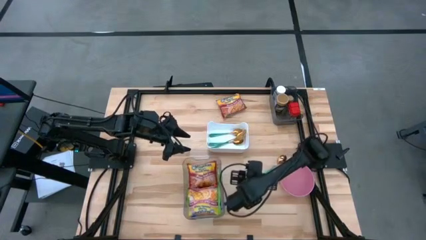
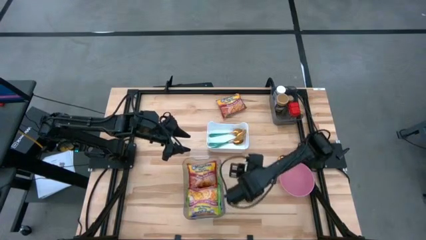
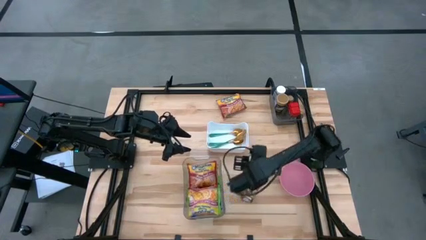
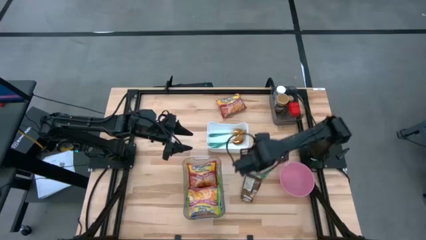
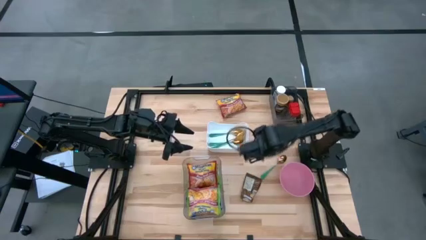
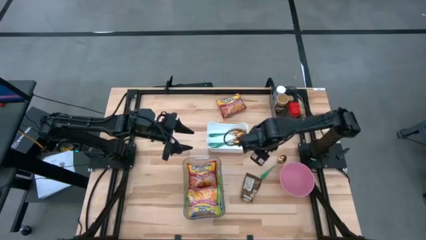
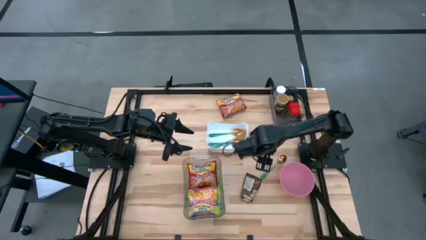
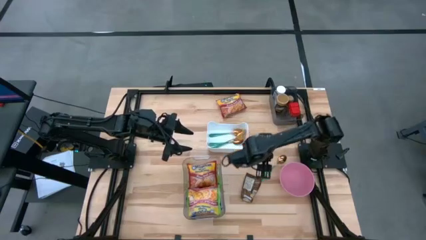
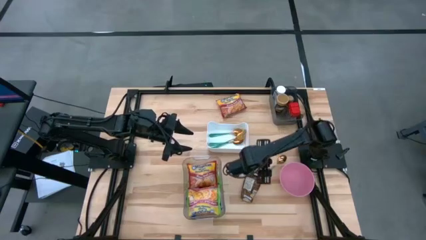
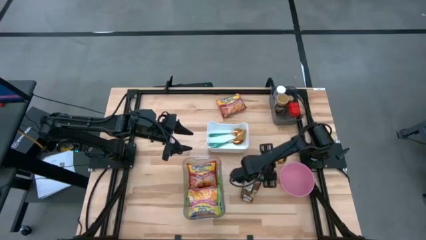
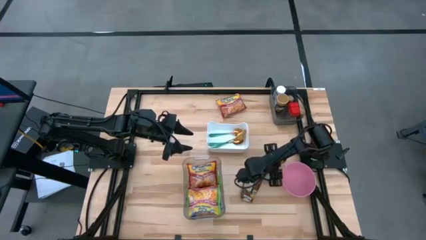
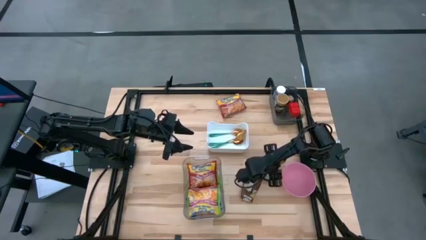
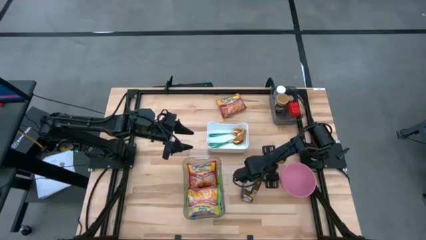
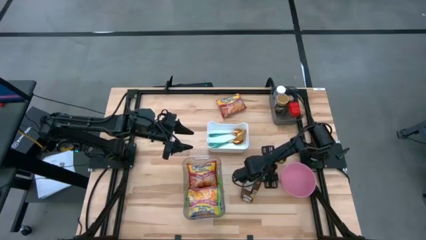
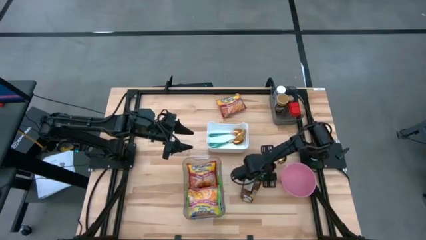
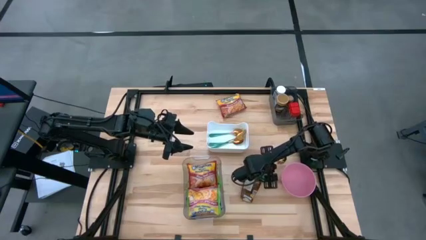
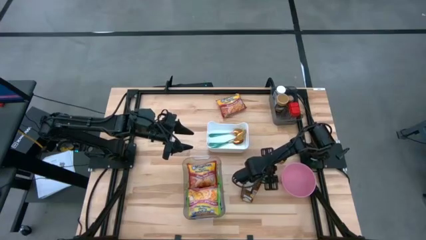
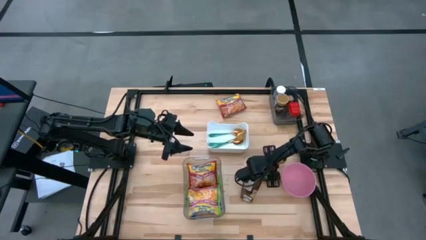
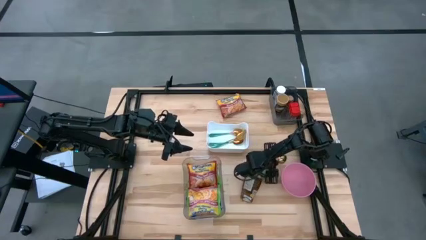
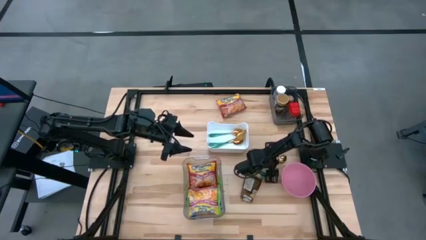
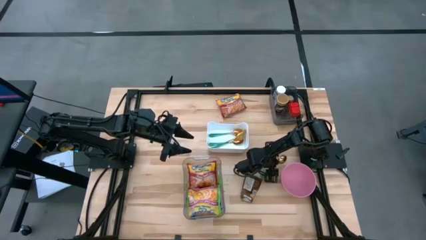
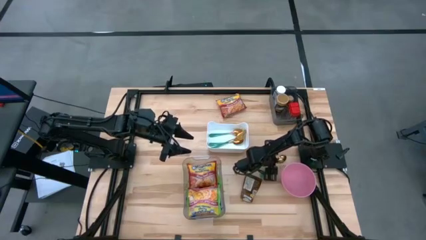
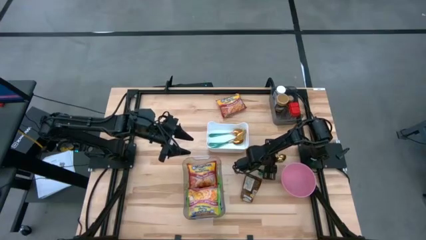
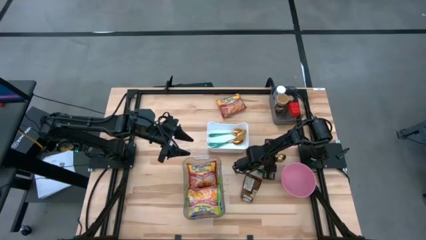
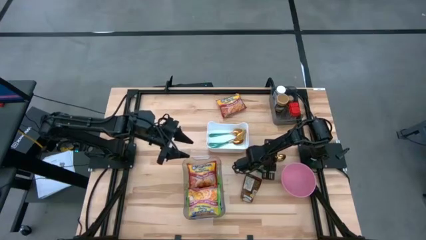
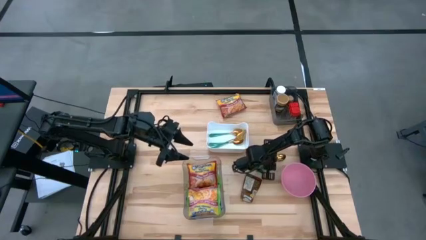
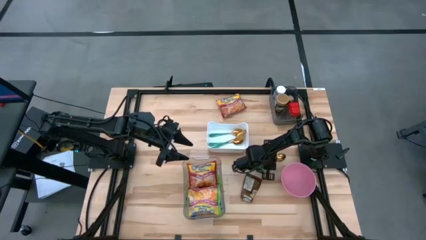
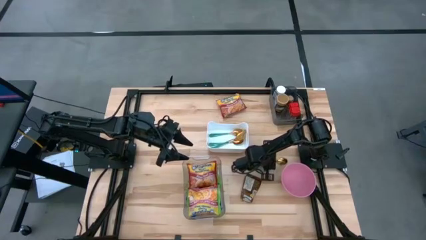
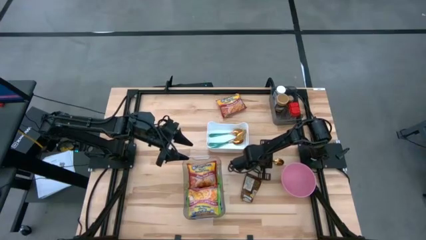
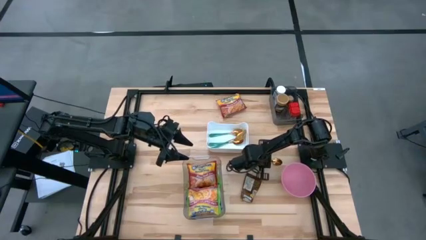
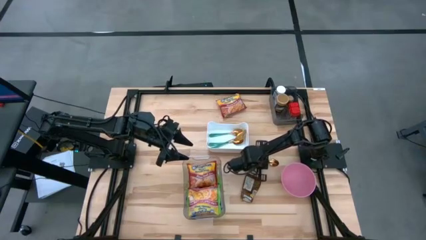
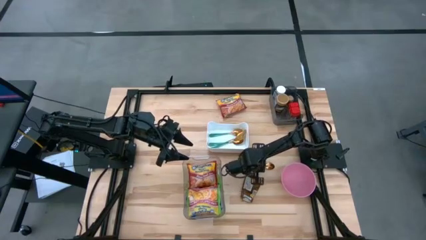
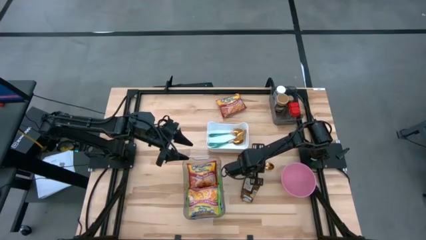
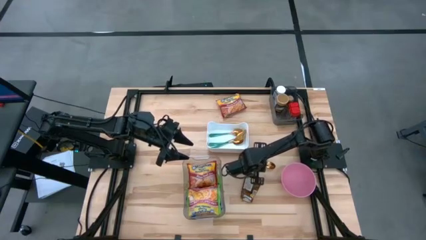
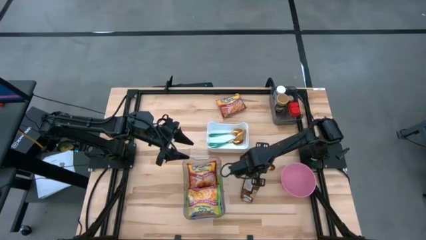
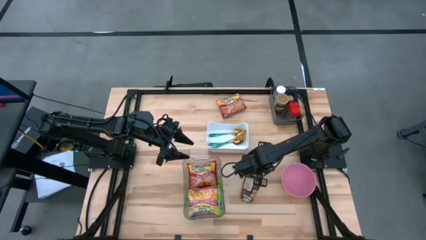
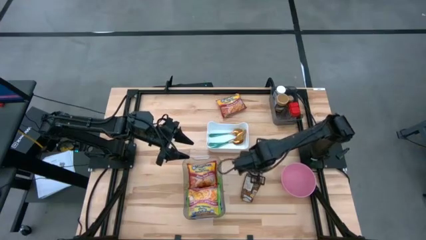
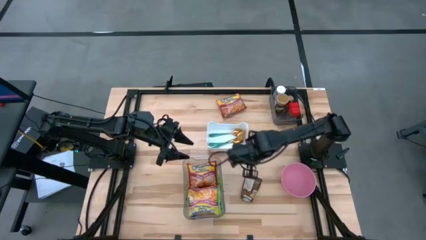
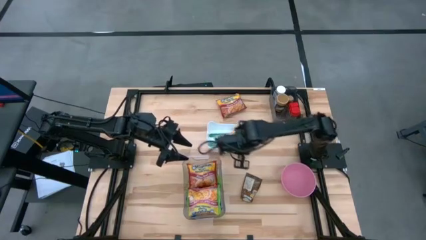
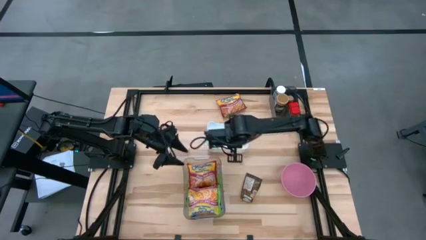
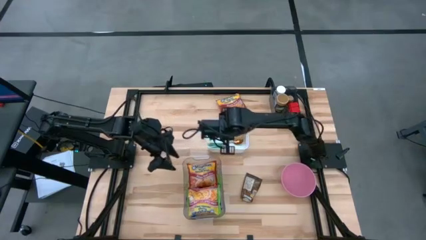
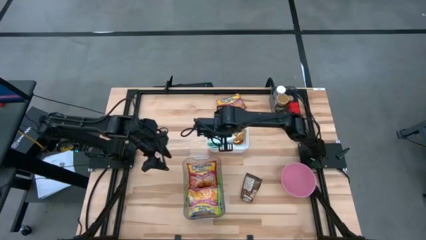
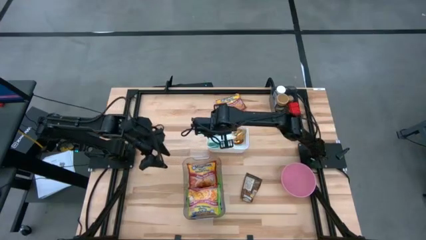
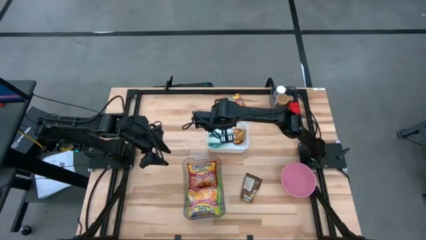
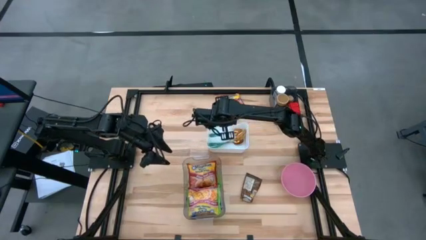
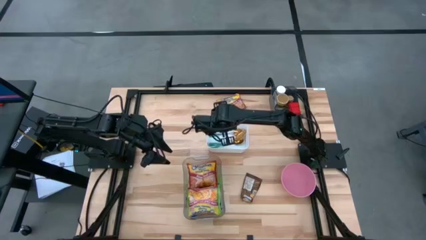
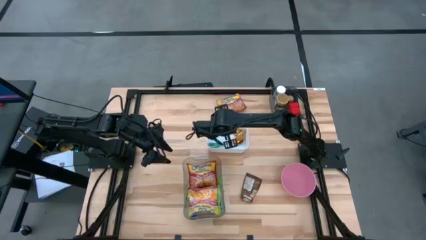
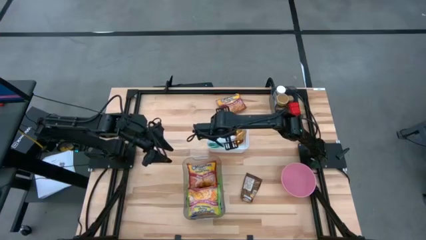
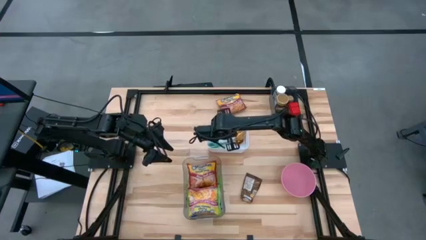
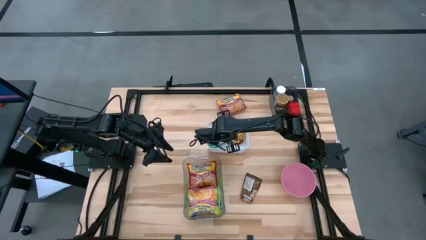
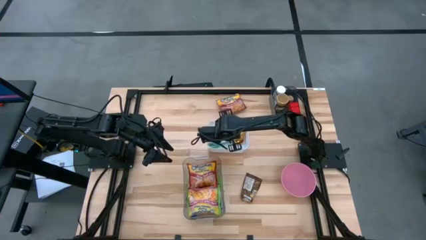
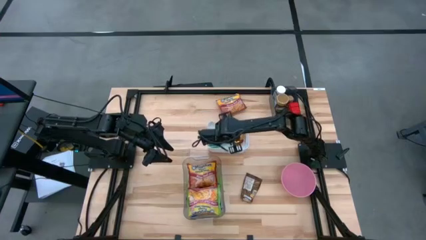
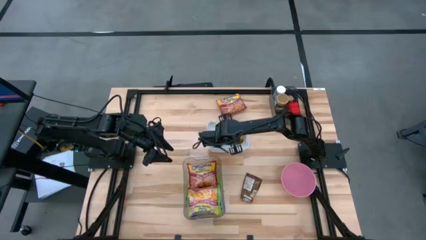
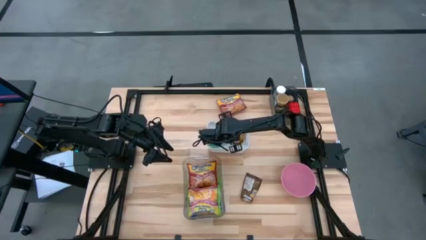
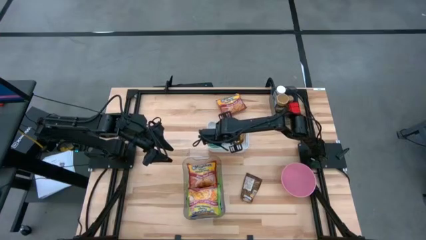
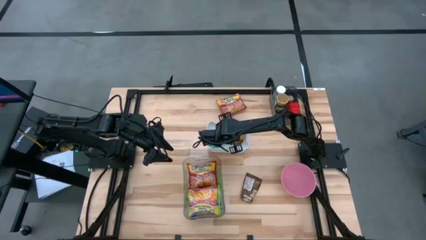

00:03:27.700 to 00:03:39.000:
Task: Pick & Place Food Item
Put the green spoon into the white bin

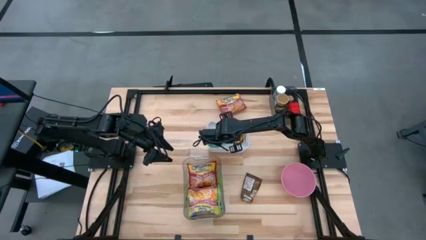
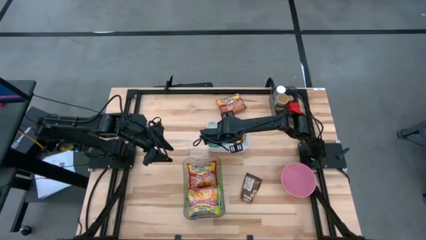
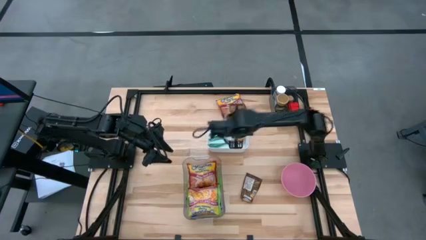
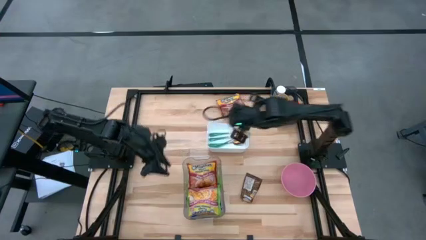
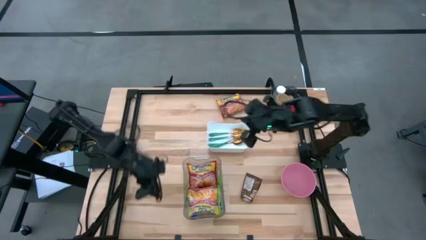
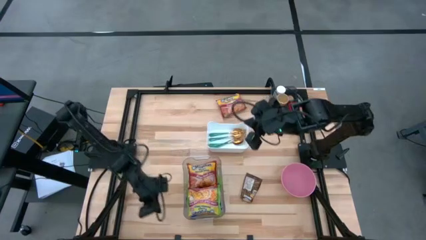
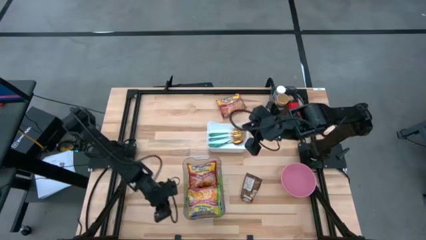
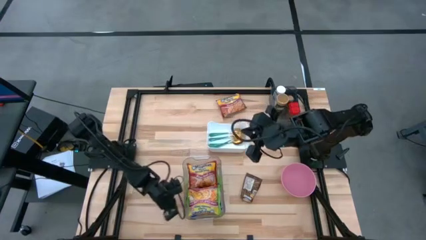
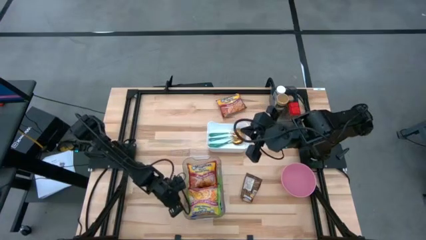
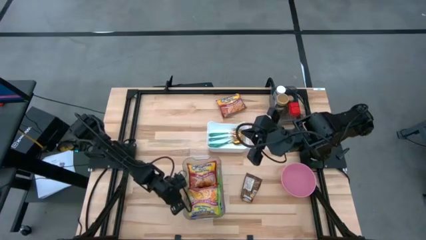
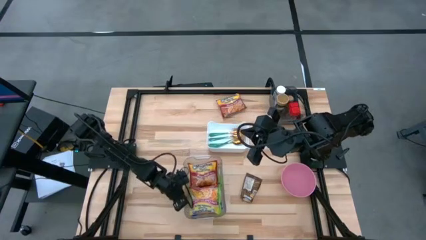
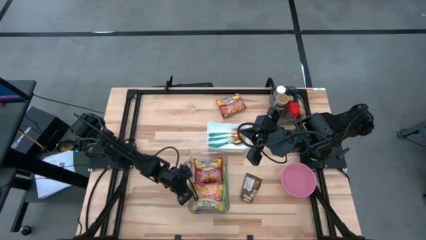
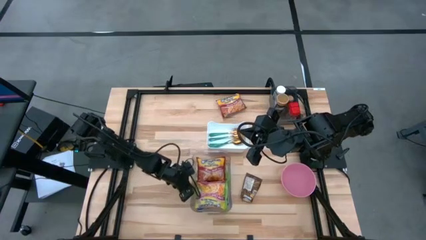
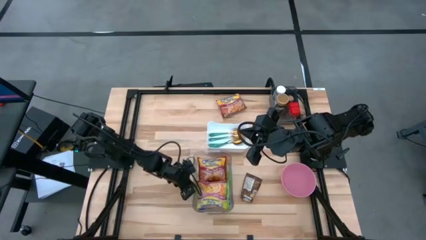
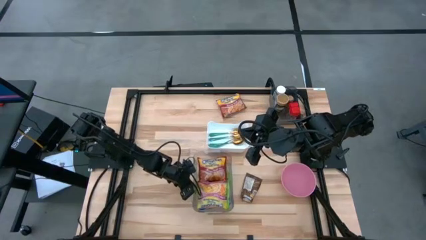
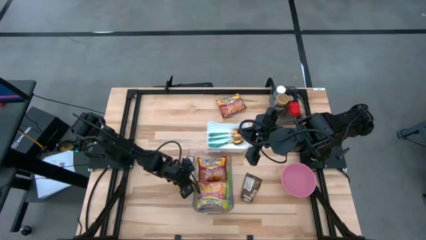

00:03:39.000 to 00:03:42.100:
Adjust the transparent bin
